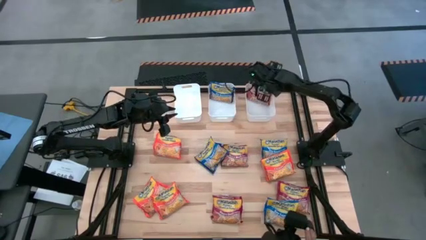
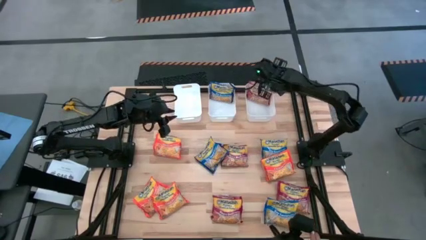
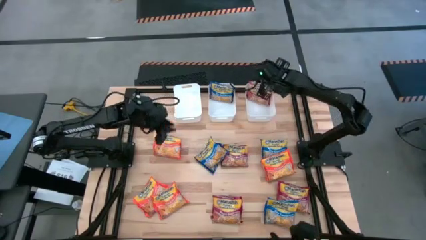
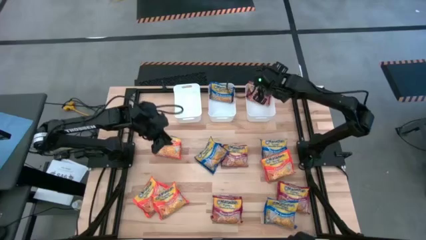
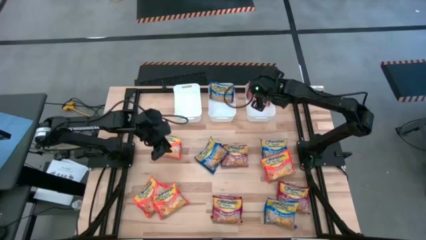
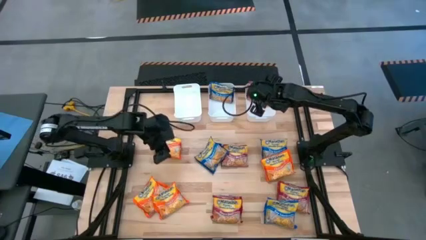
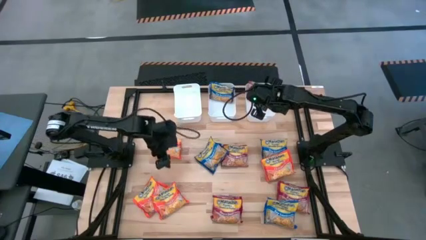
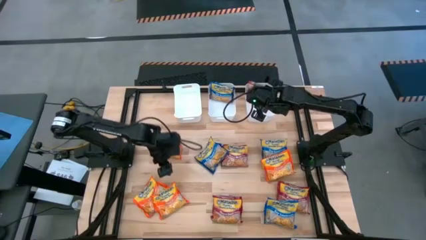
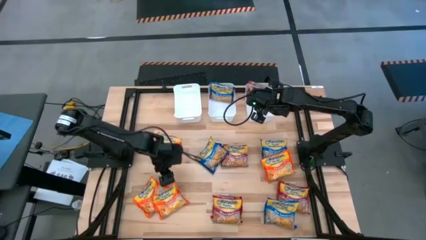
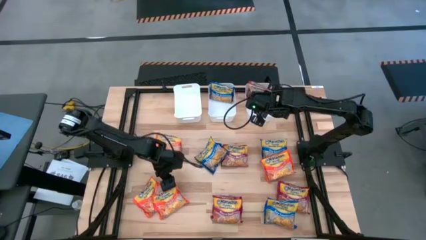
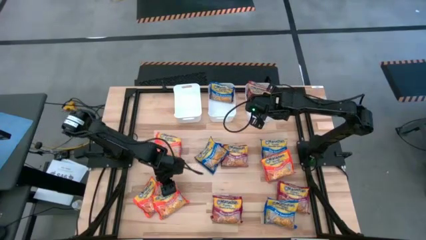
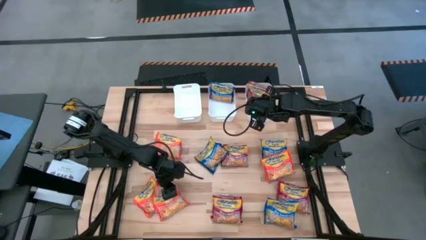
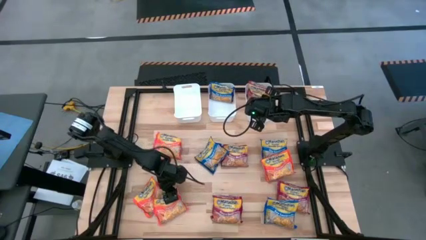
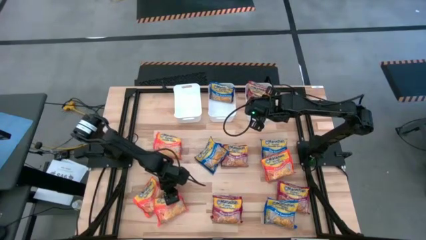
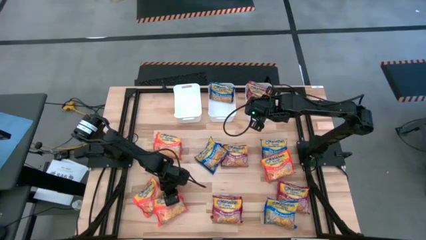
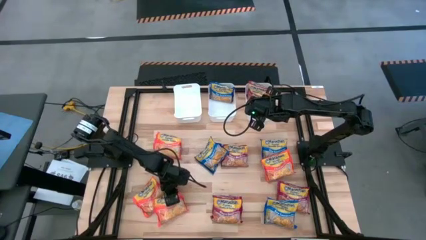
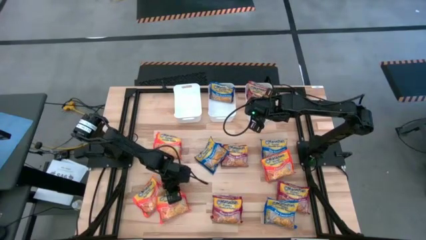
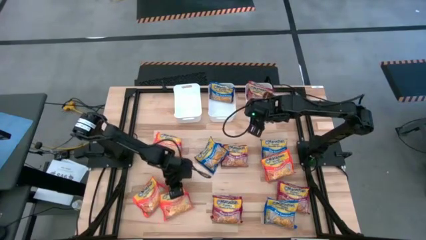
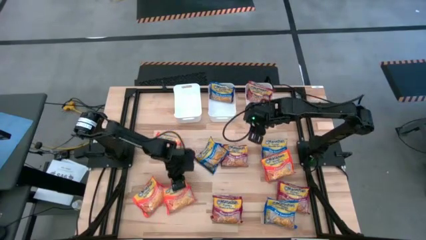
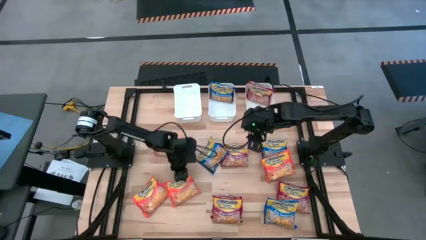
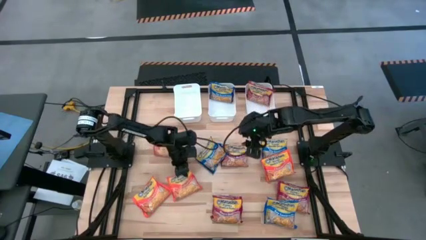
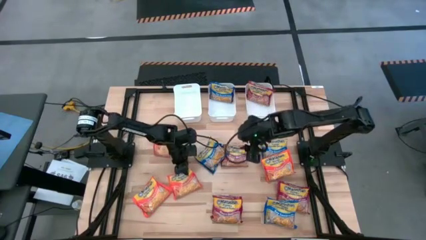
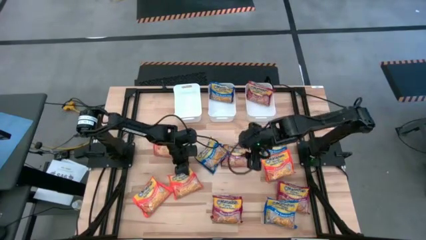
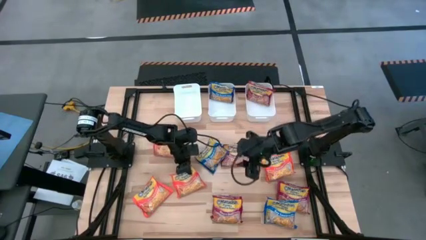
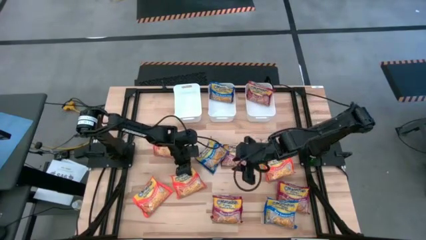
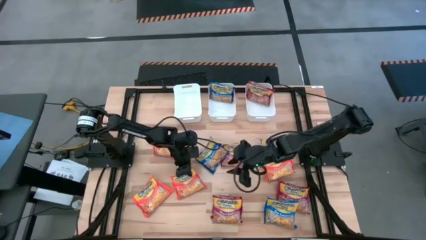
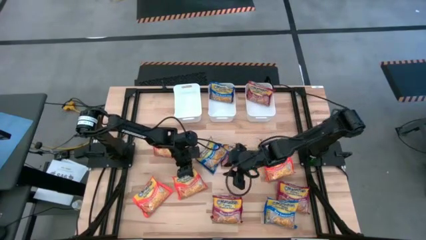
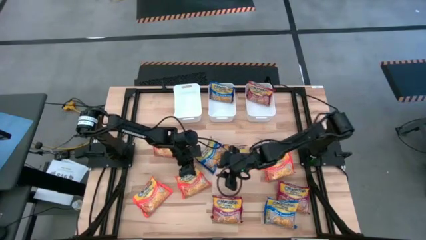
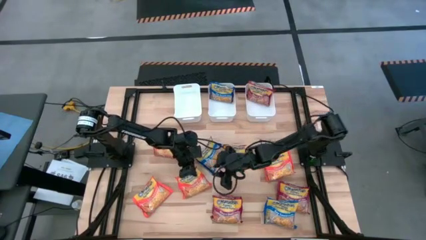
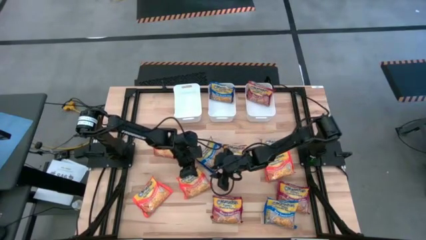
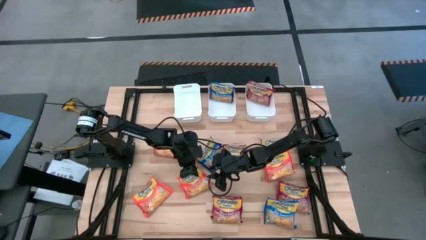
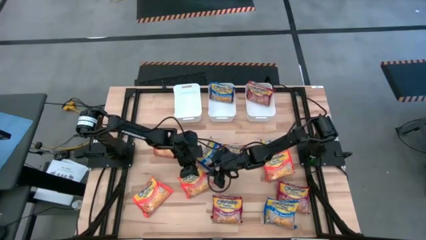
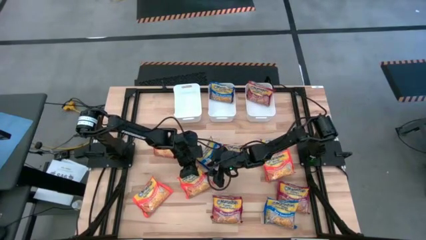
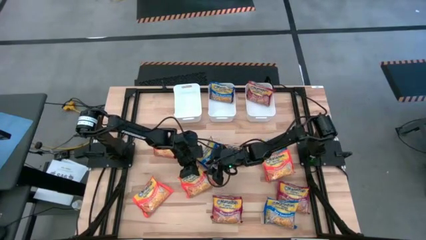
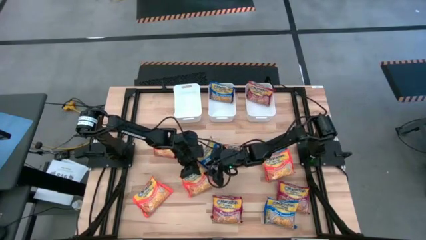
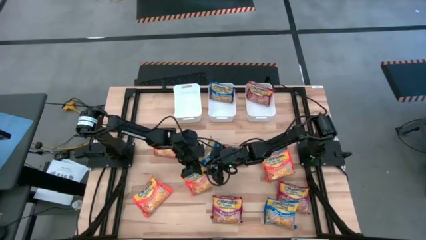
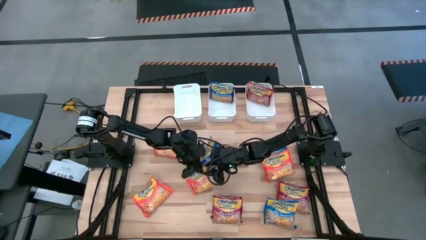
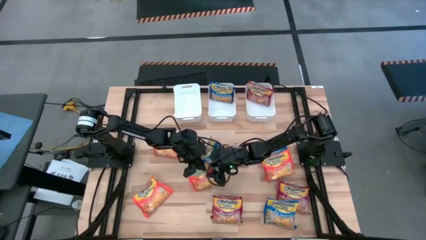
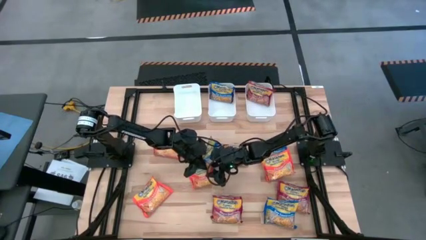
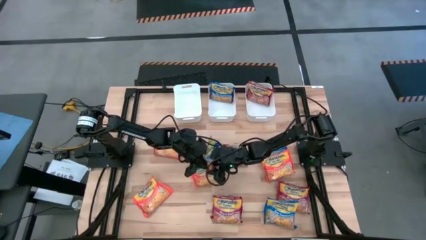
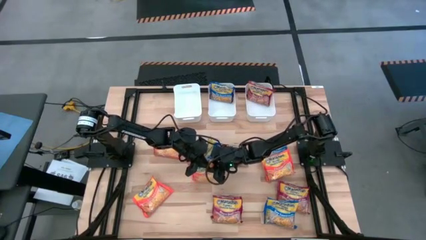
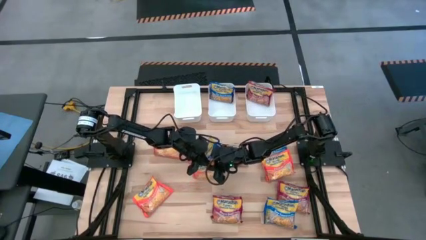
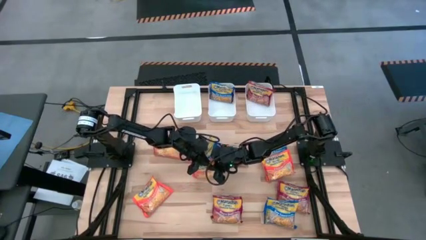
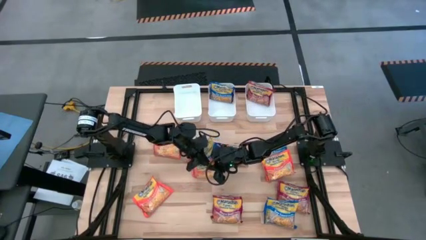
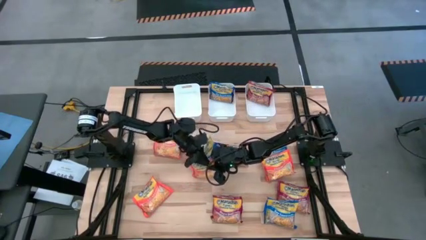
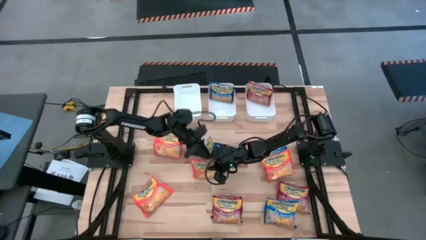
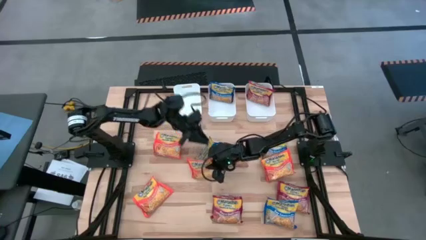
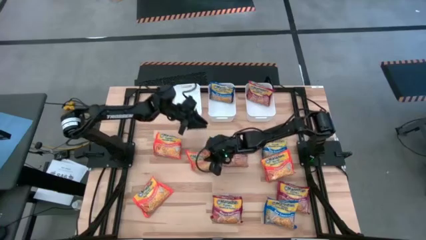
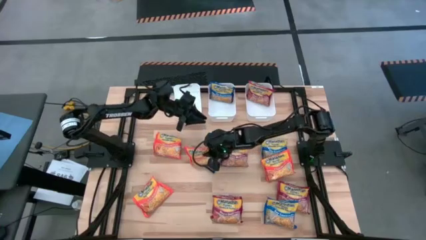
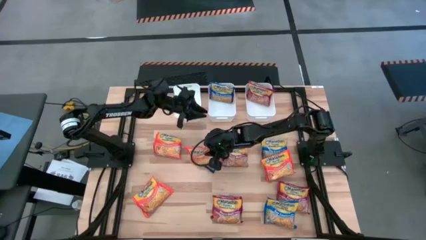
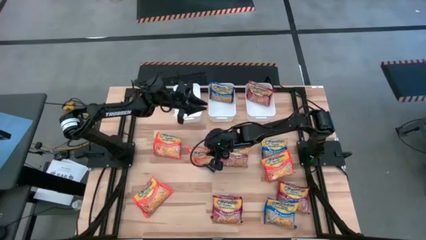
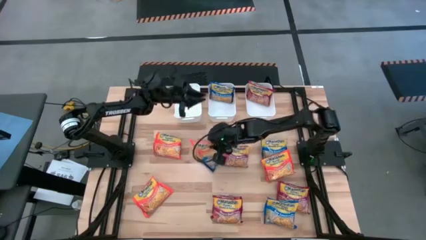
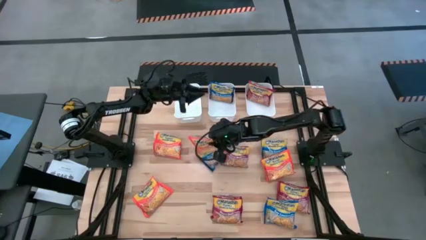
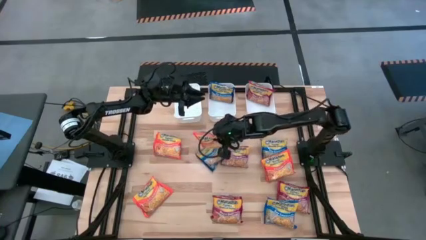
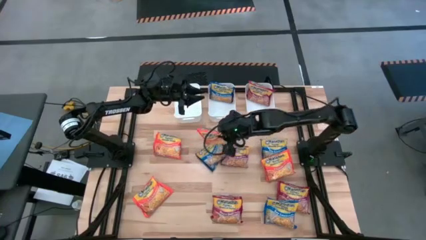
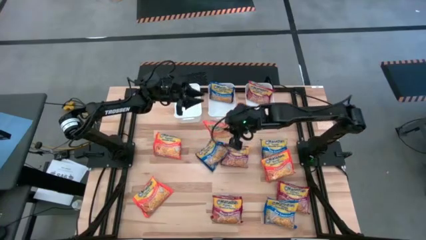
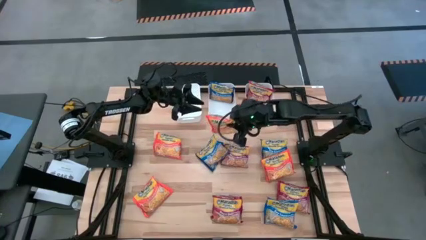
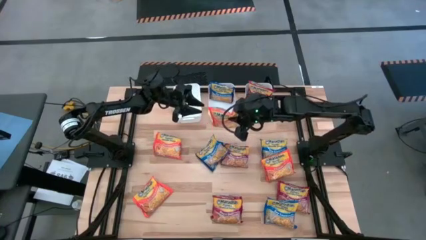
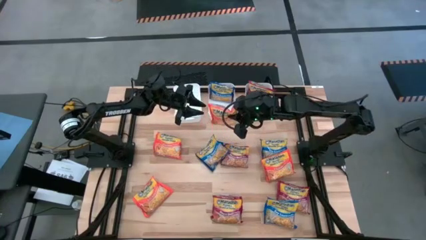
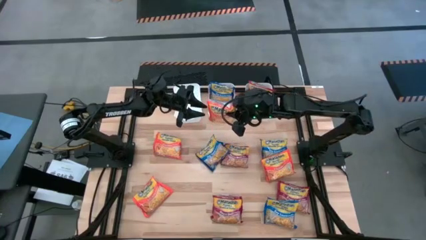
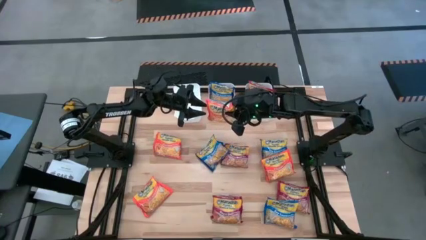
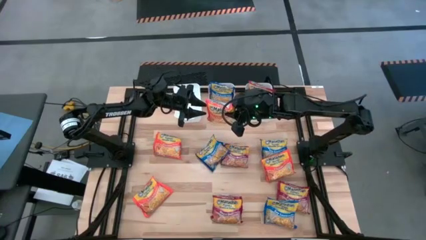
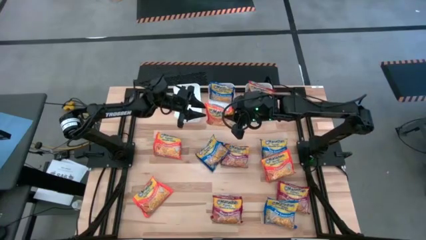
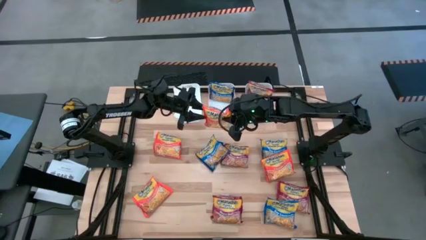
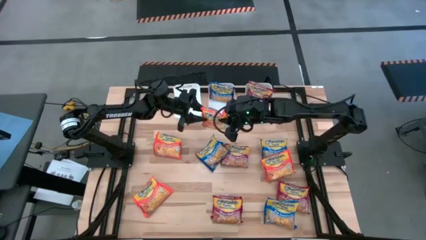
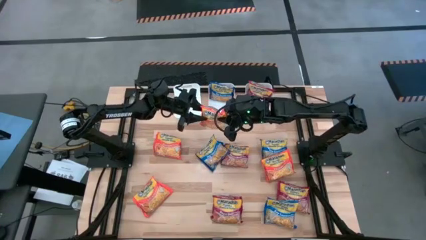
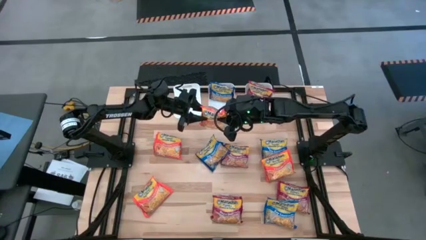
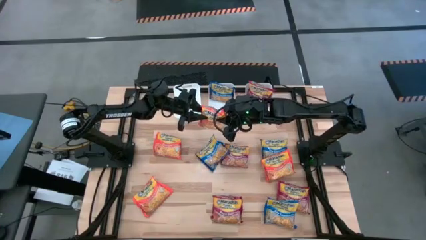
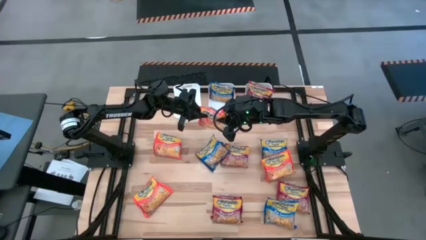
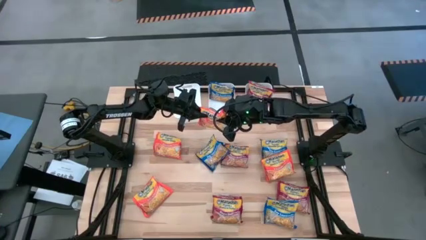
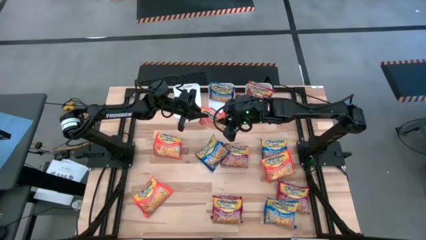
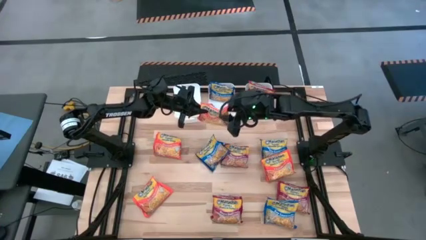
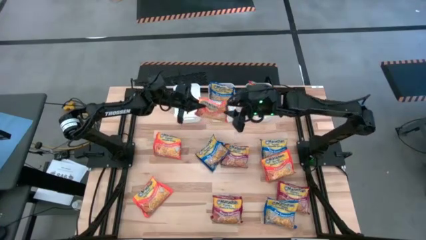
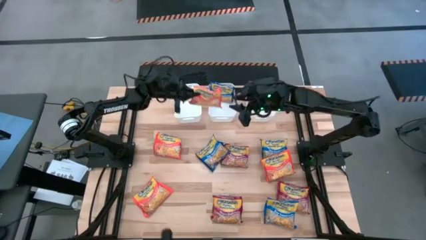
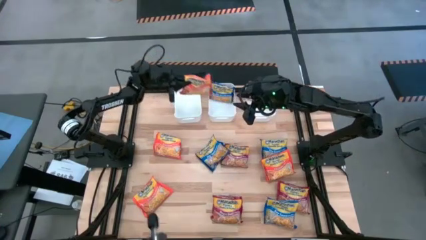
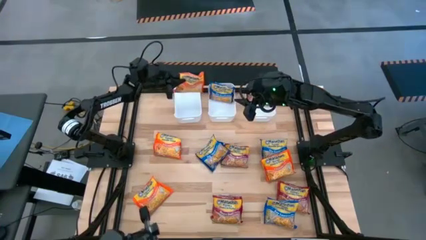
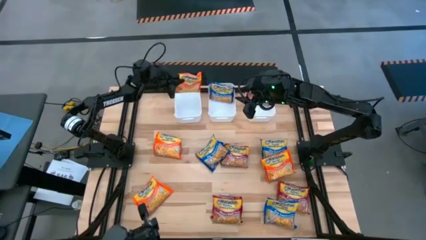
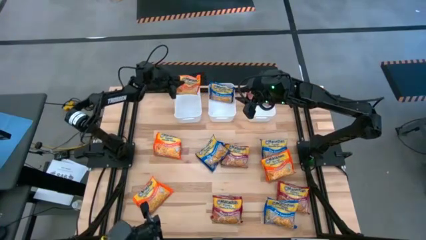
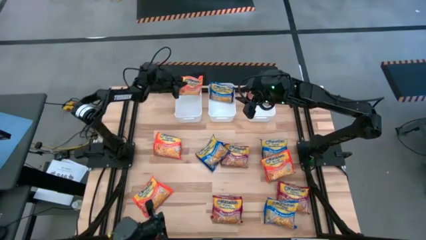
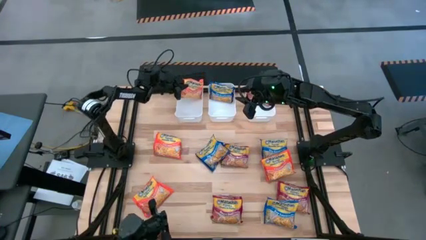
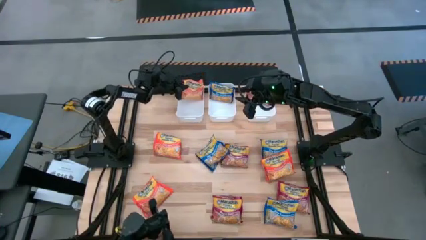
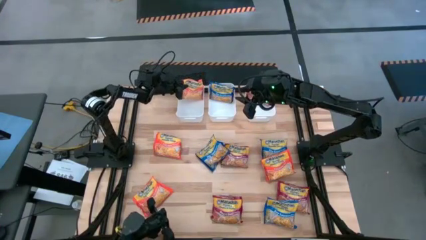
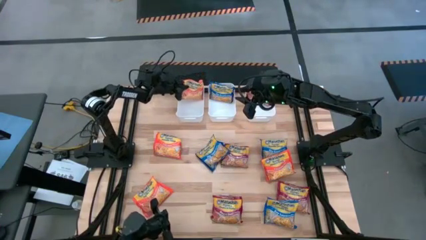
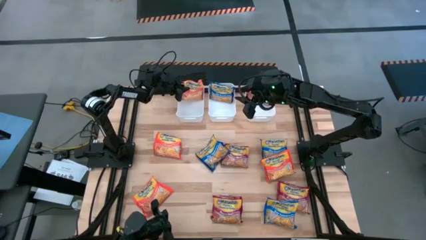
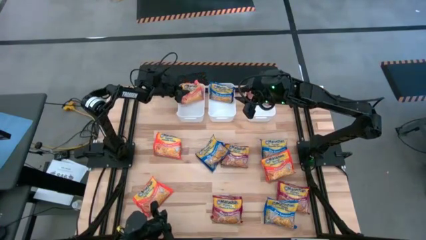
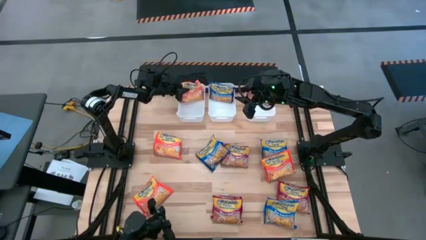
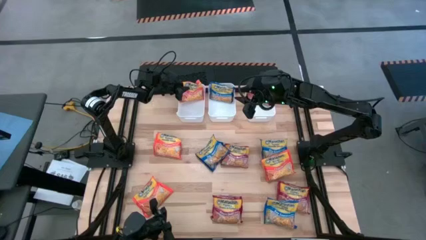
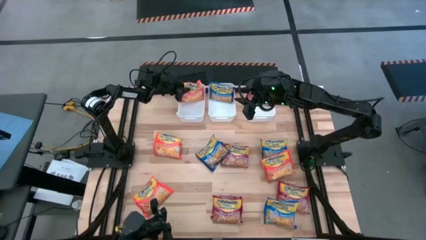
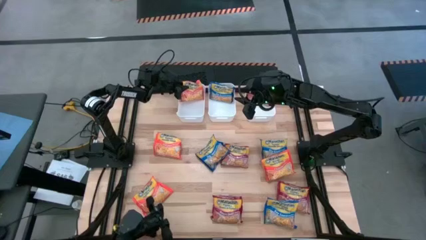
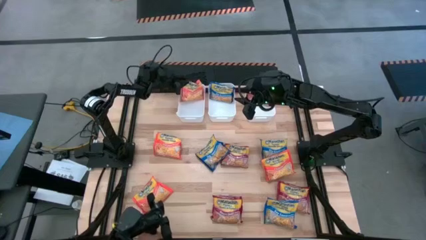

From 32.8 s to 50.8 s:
Task: Sort Maruchan noodles
Put the orange noodle pack into the left white bin
